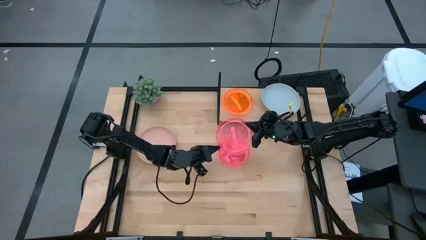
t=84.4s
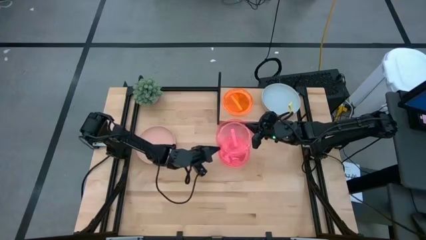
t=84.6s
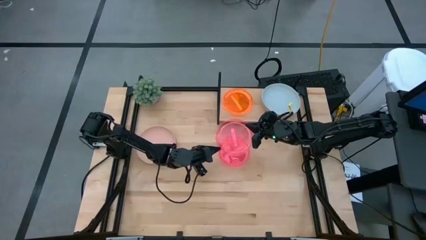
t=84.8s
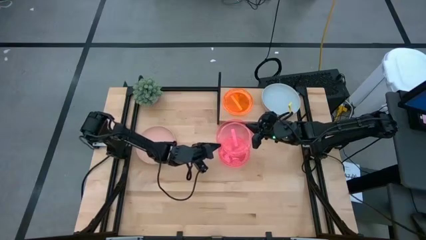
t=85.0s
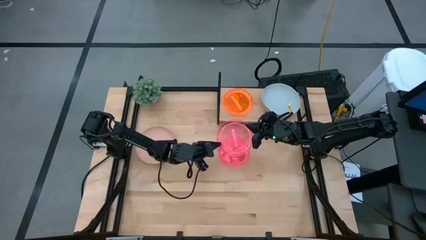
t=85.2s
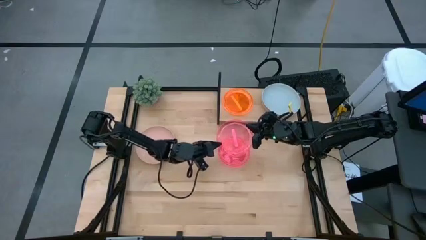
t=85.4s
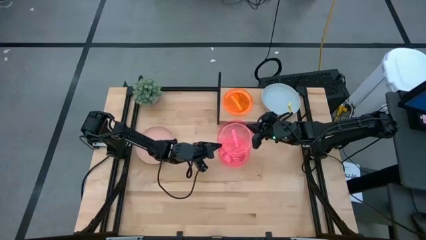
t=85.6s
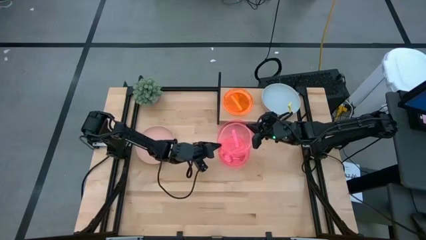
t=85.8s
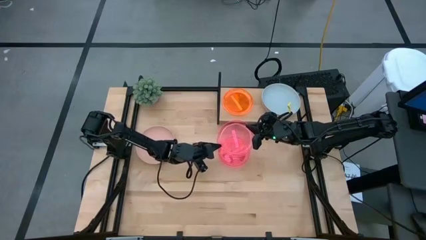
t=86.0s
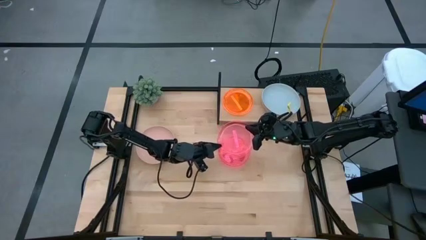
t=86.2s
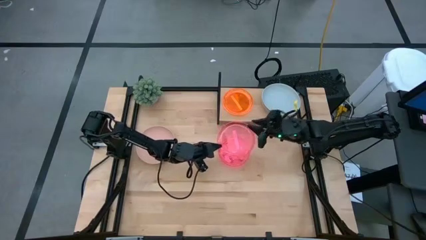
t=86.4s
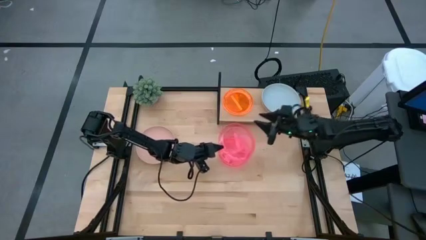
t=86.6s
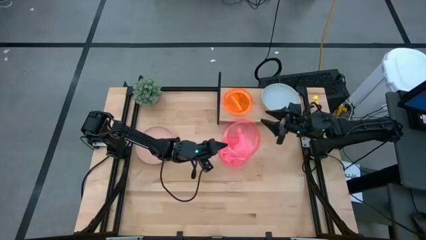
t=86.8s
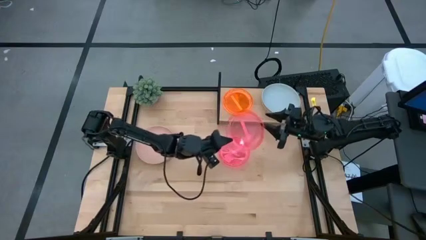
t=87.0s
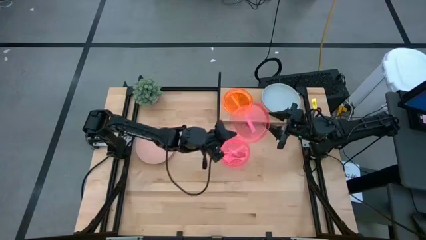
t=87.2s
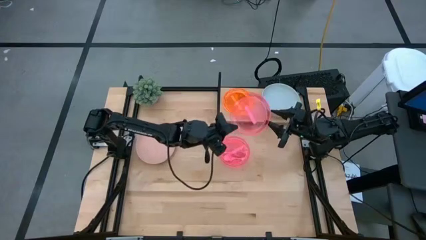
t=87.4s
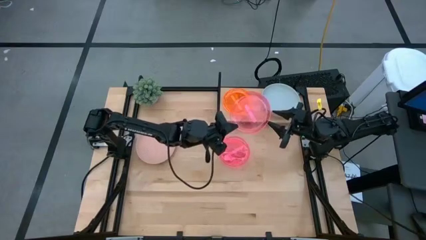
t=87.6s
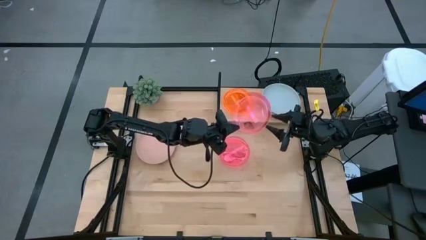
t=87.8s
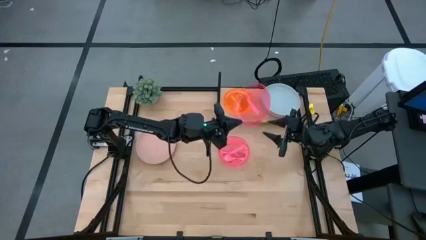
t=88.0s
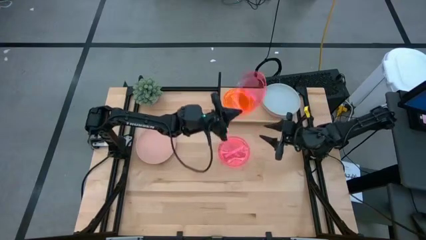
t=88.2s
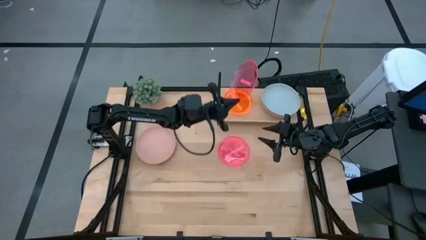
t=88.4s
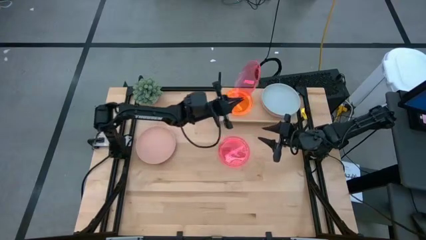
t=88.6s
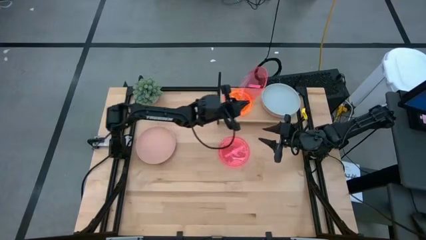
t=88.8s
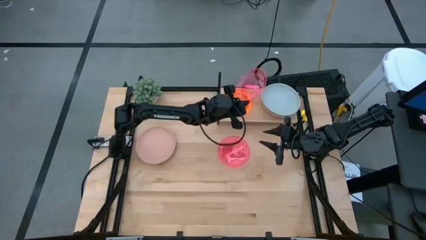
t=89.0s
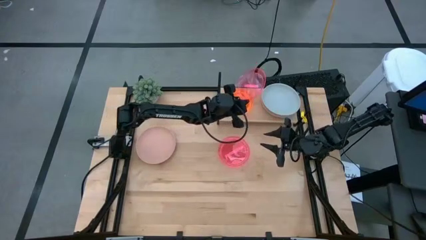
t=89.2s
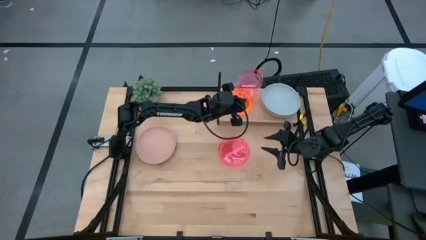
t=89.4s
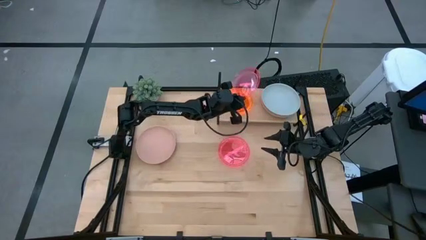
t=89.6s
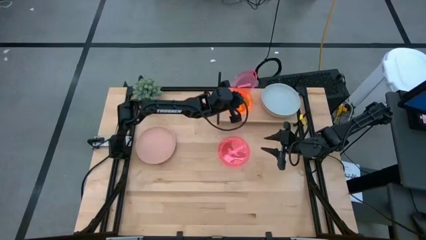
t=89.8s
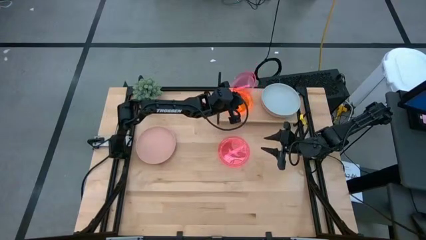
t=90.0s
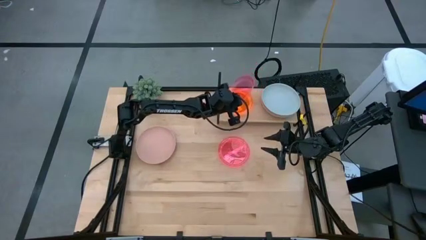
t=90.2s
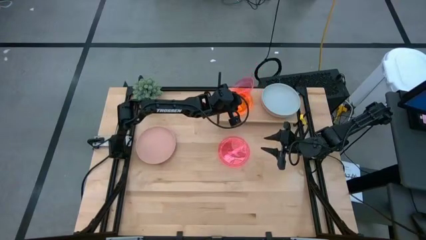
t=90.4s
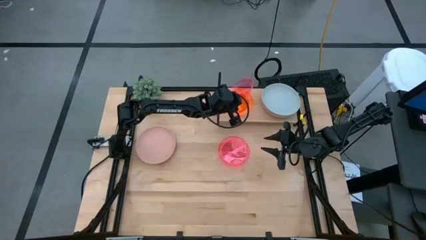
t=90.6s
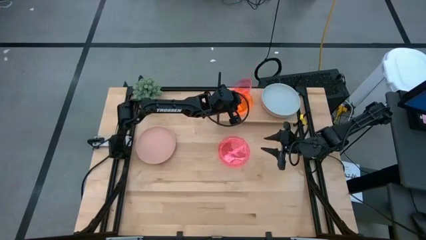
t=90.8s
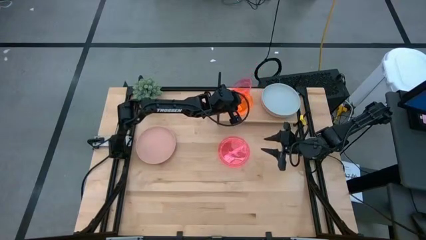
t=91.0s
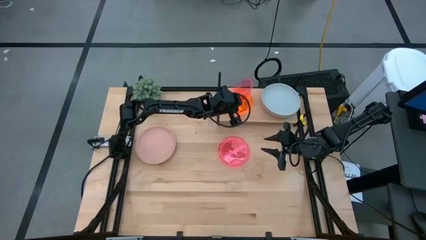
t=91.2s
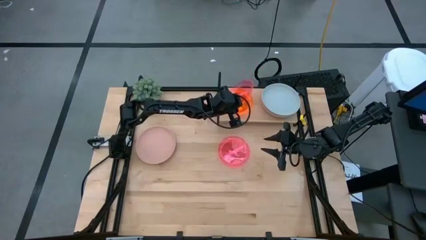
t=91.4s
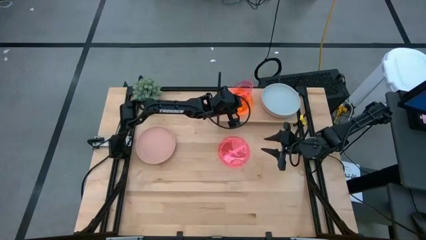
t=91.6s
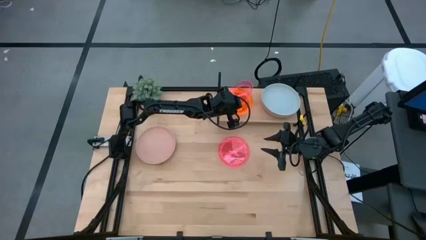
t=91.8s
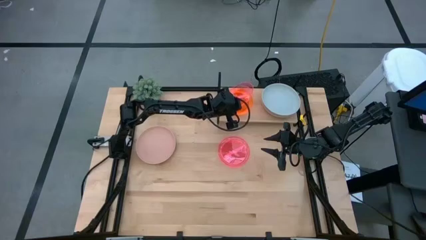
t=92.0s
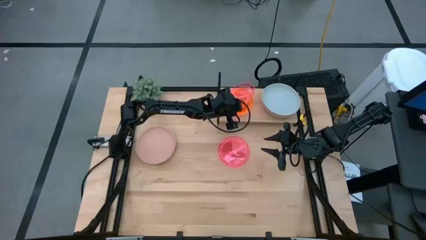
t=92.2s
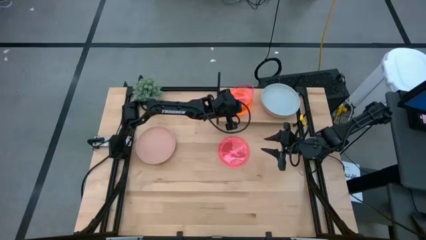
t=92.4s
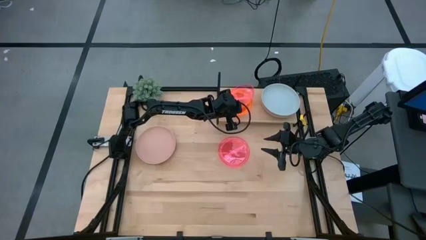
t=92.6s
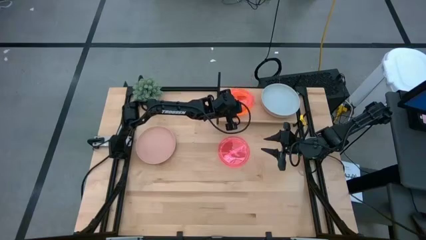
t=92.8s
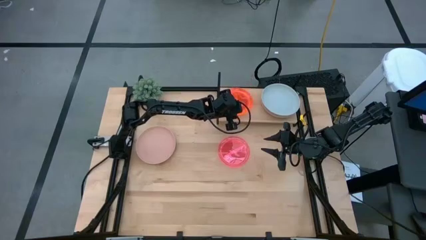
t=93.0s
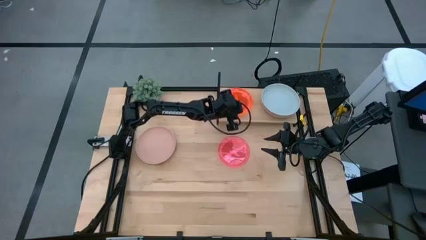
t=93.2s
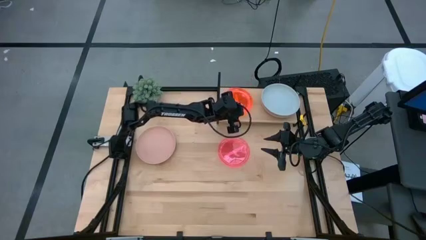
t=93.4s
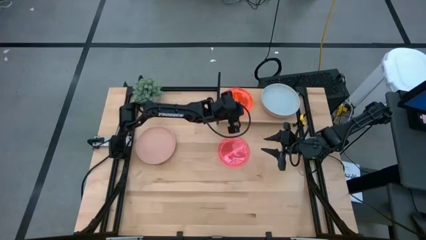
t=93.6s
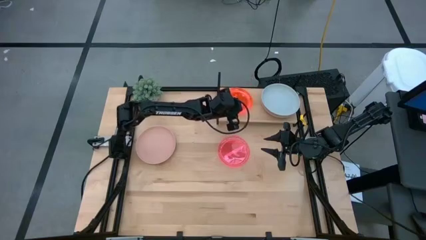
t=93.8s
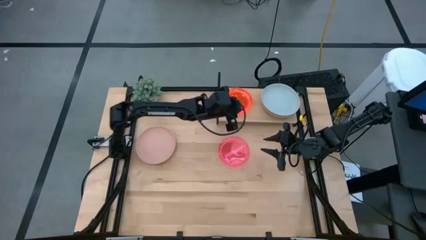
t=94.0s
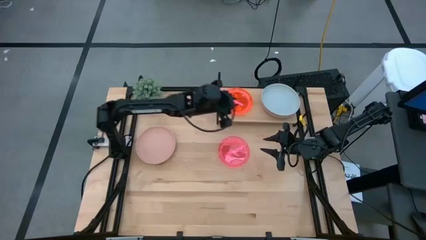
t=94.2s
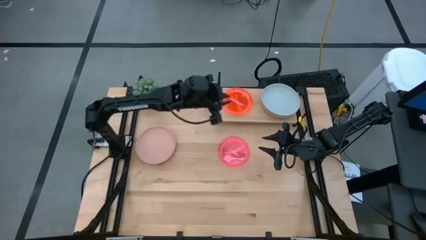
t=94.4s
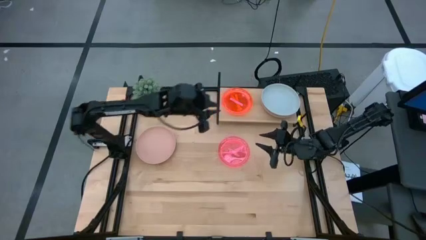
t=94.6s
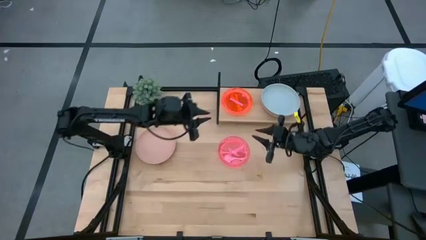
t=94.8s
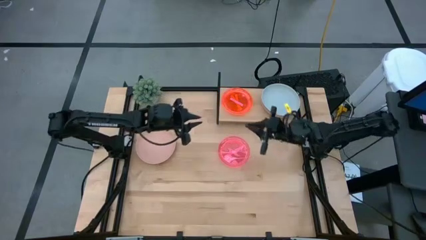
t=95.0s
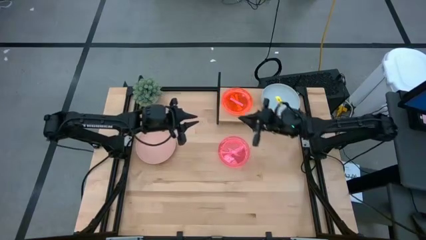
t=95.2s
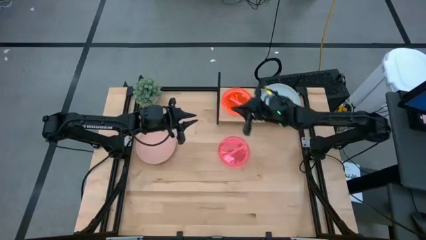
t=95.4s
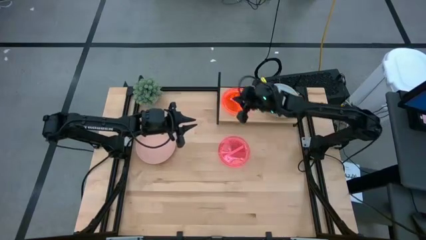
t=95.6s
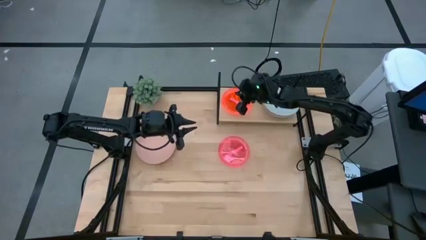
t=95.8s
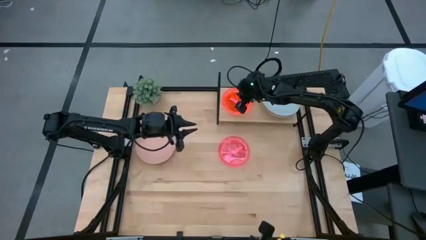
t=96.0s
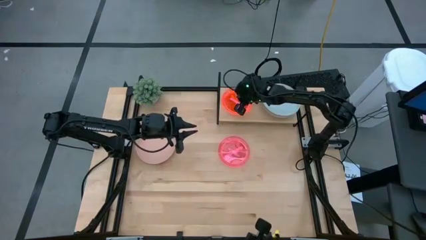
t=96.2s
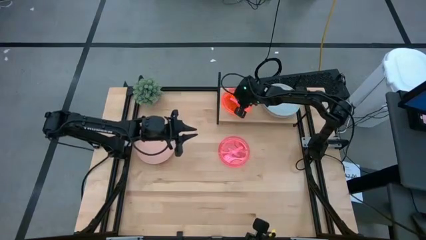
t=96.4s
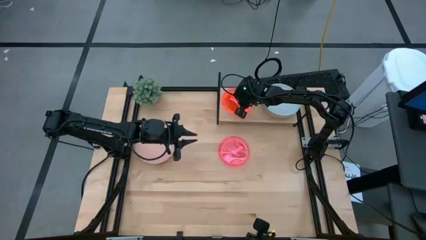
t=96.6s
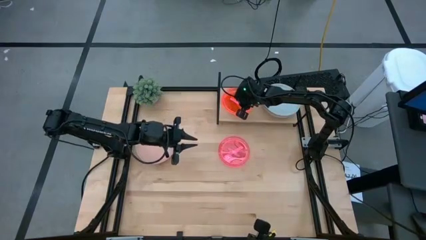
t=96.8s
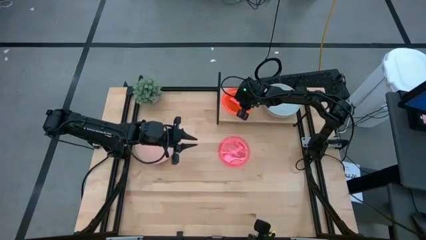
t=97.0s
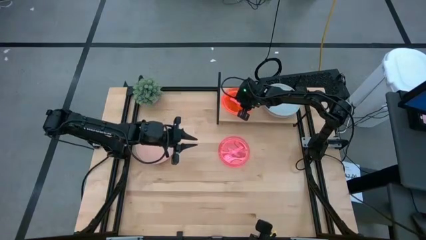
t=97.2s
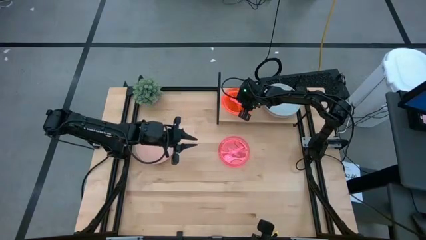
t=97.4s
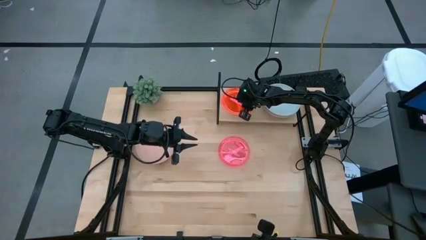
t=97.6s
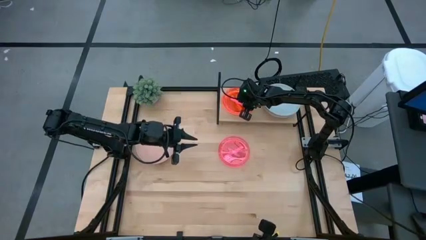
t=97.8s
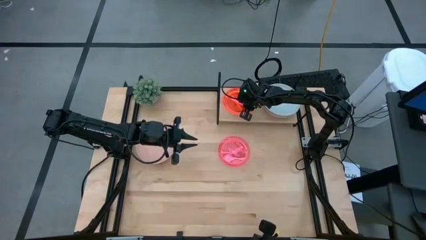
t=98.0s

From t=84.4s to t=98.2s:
Task: Place and stack plates onto a shelf
Stack the bottom pink plate on top of the orange plate on the shelf
